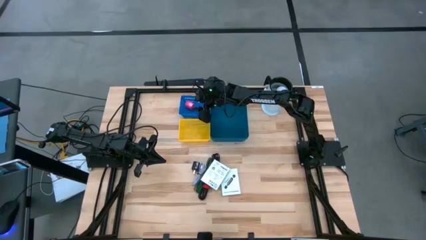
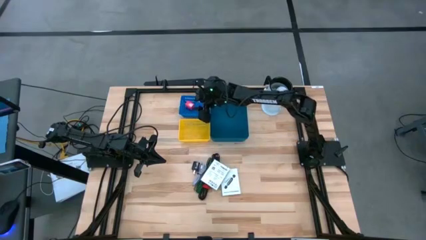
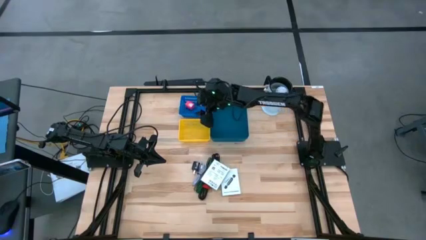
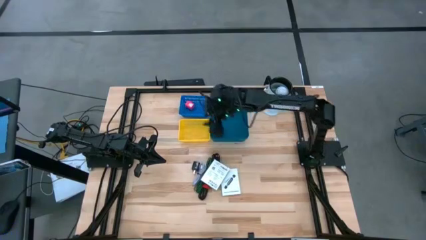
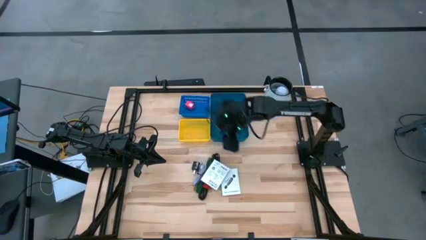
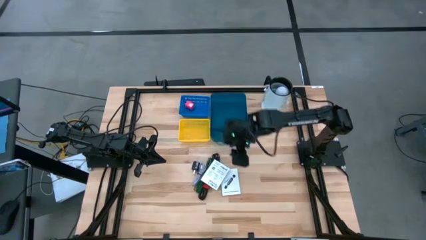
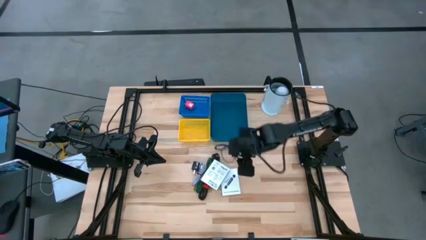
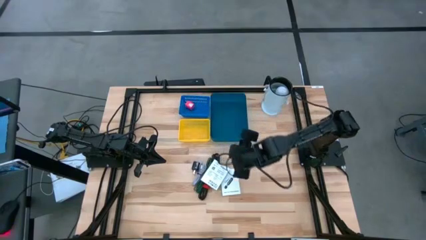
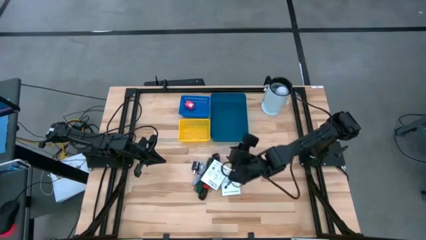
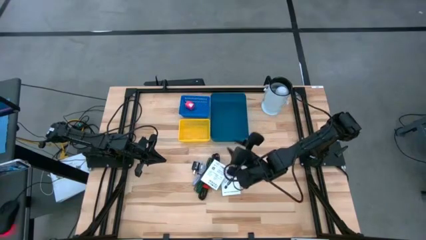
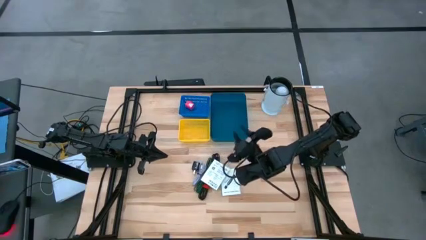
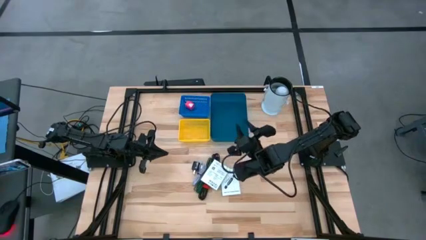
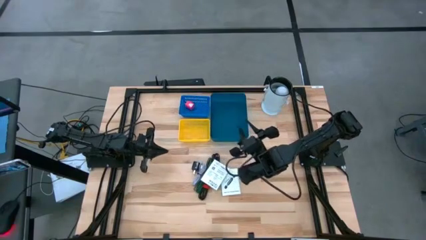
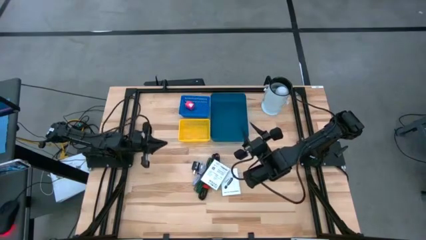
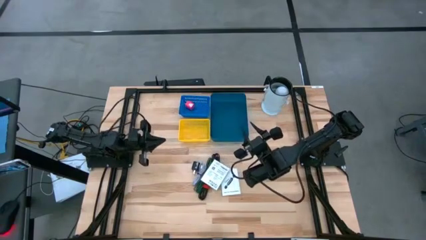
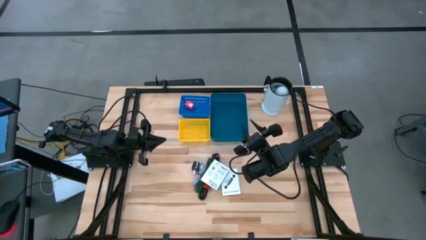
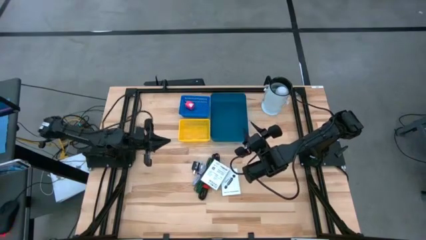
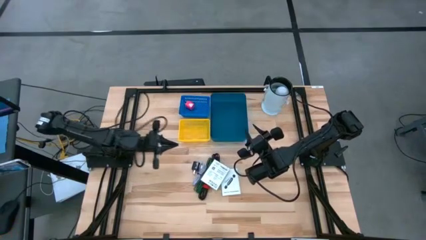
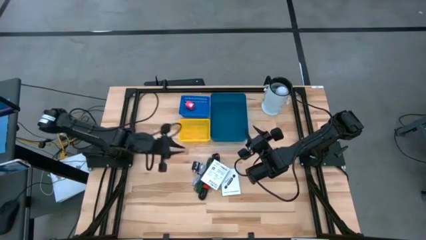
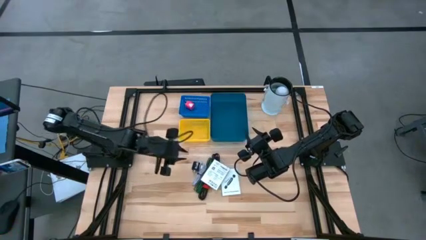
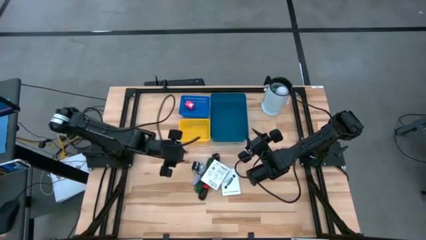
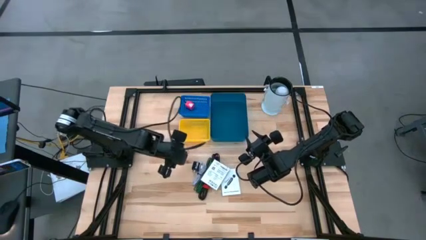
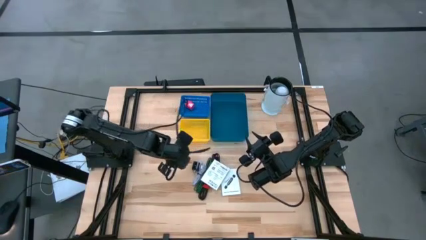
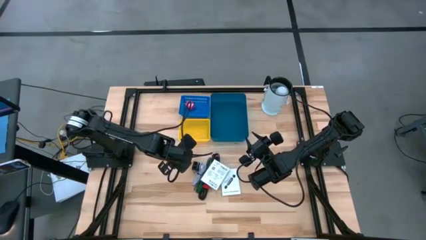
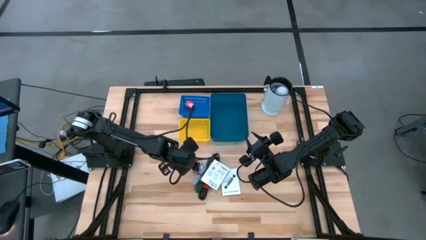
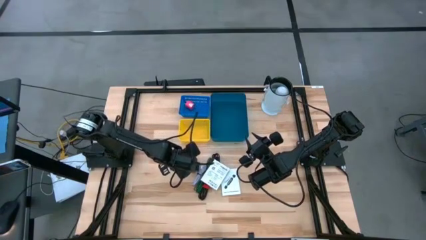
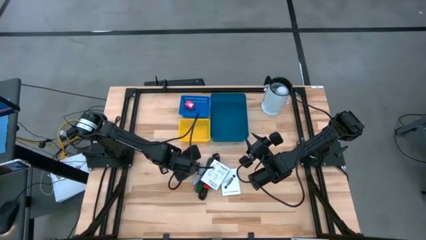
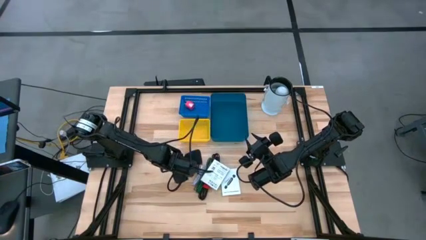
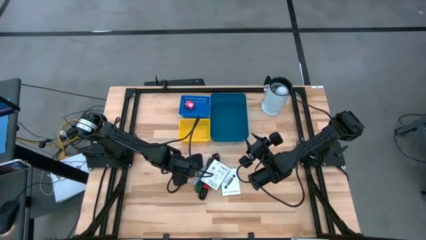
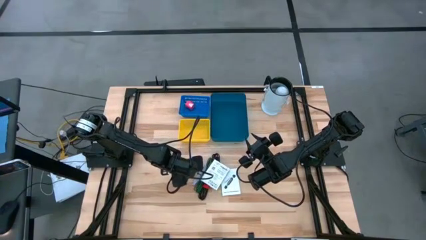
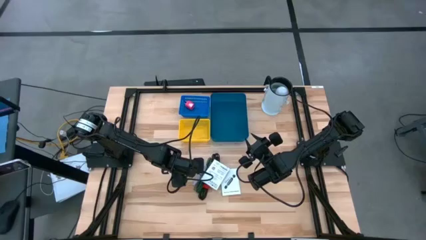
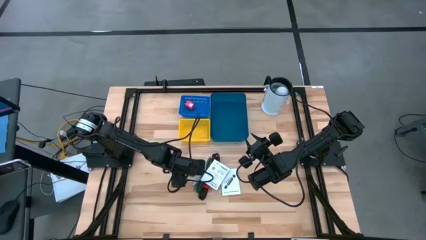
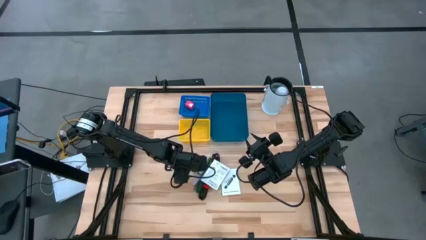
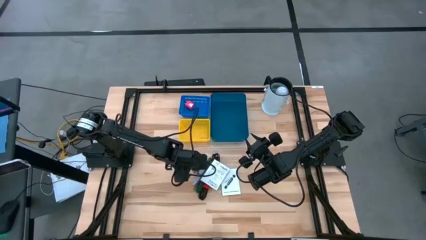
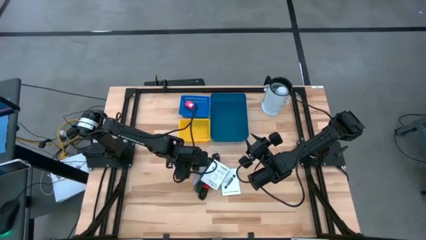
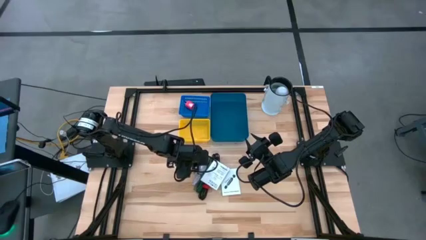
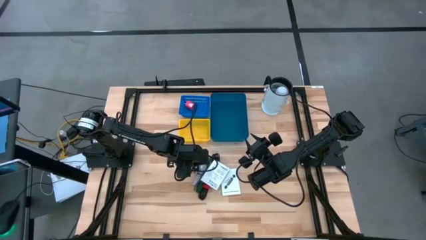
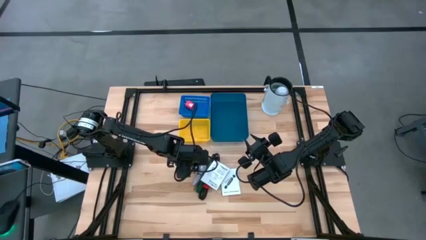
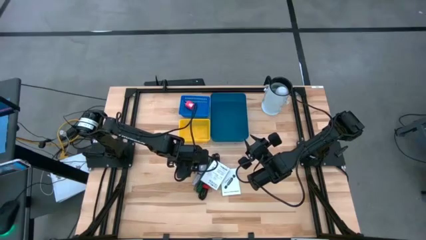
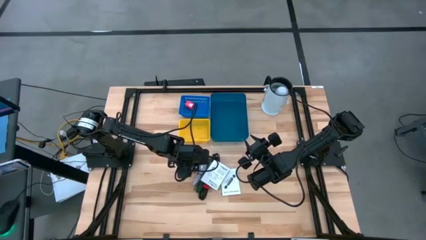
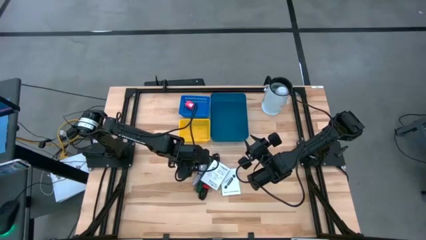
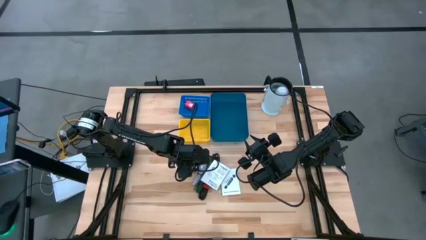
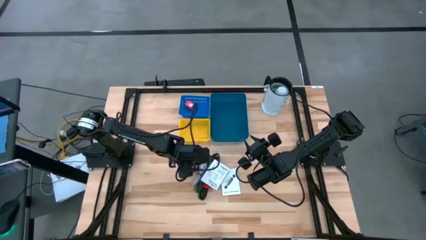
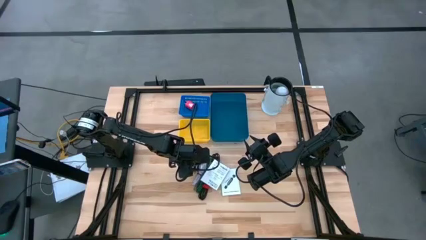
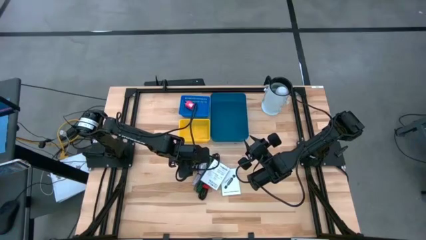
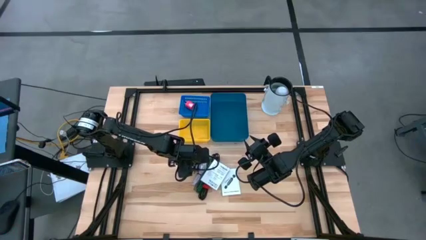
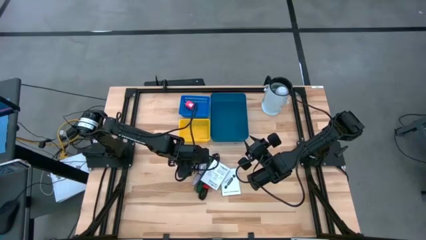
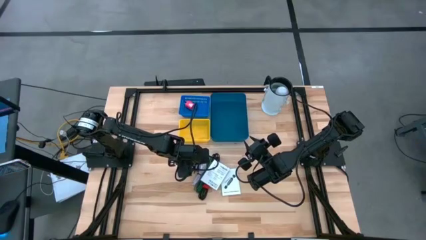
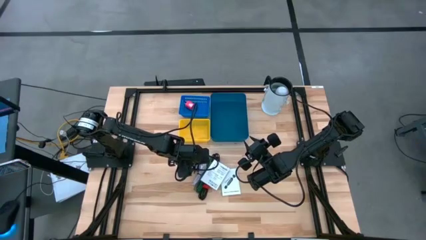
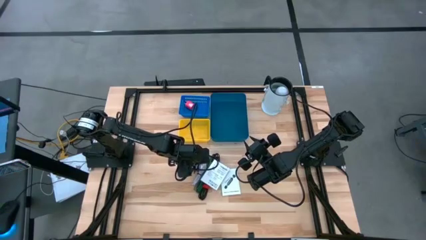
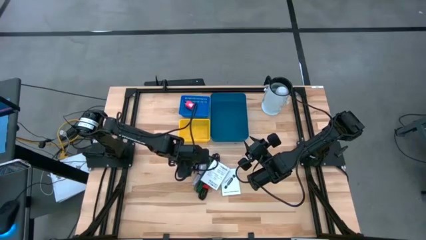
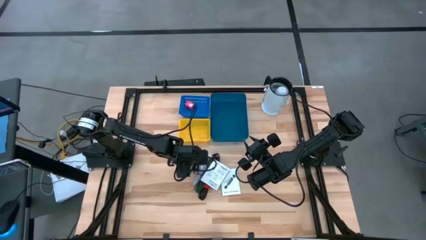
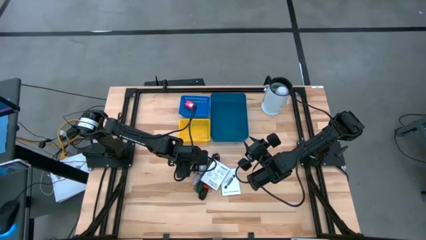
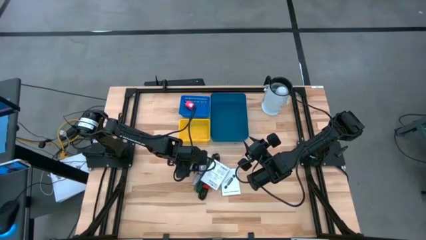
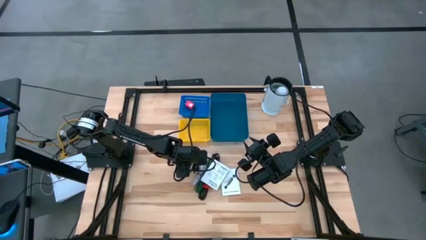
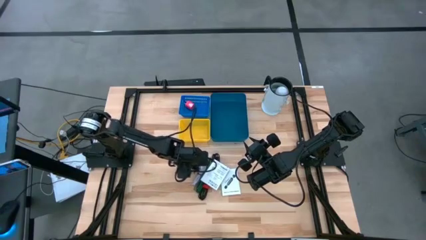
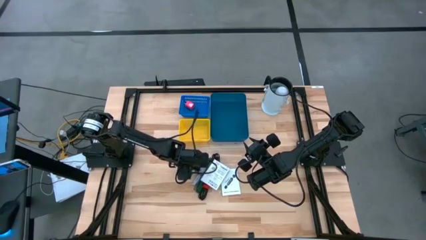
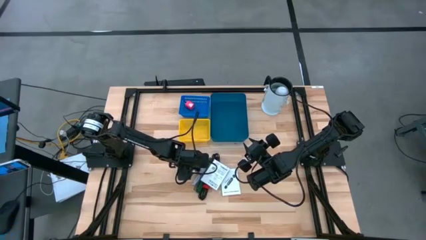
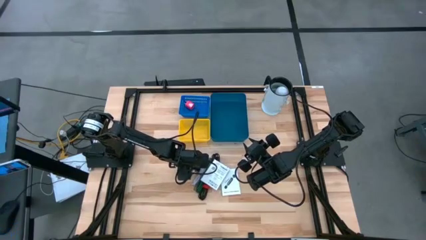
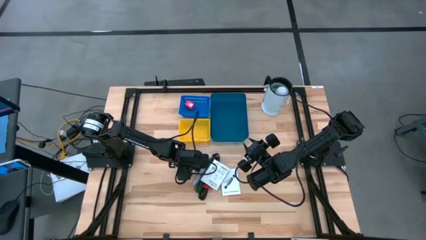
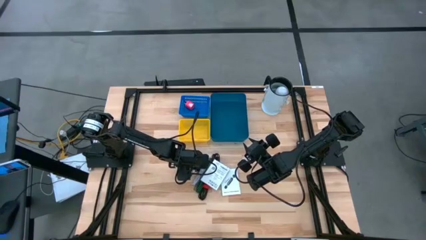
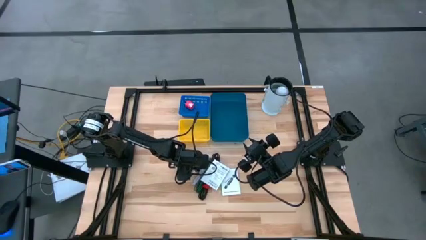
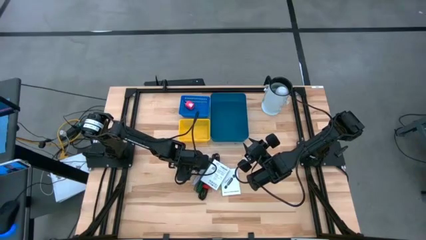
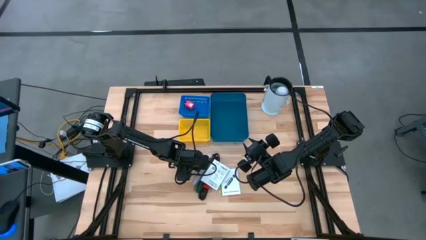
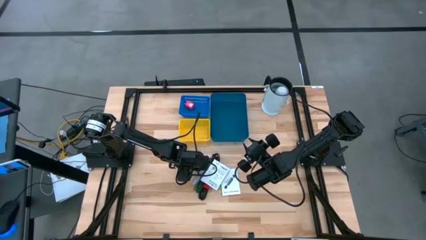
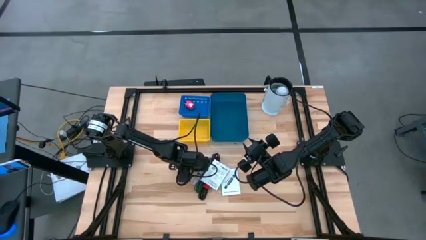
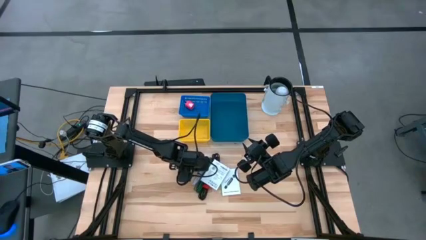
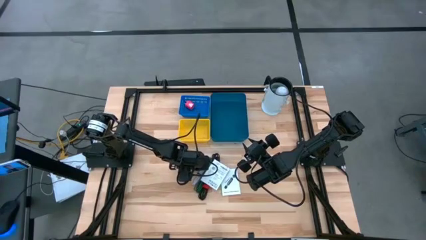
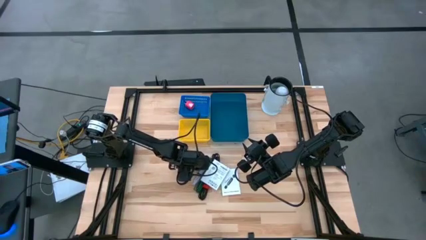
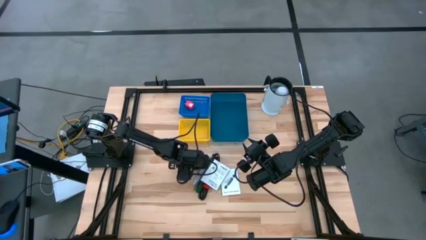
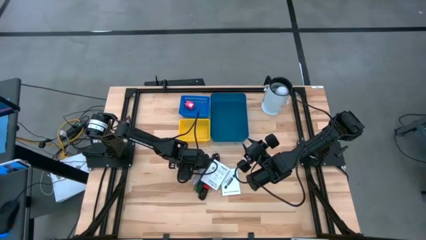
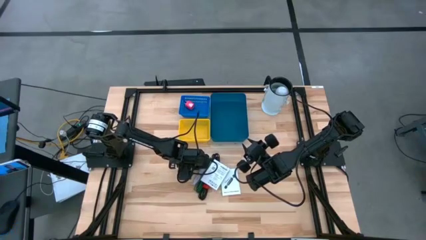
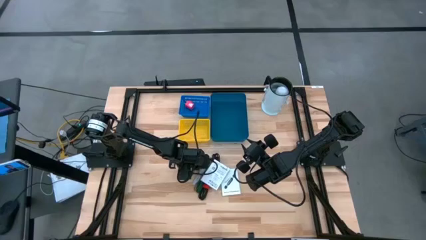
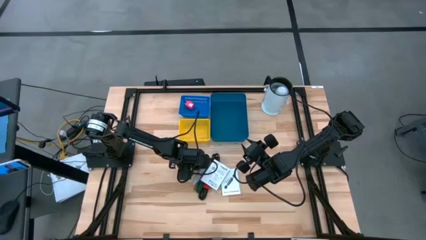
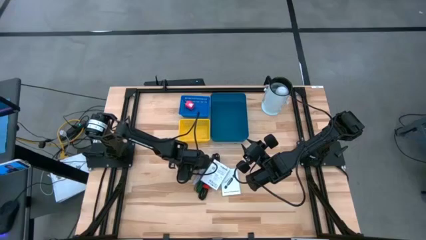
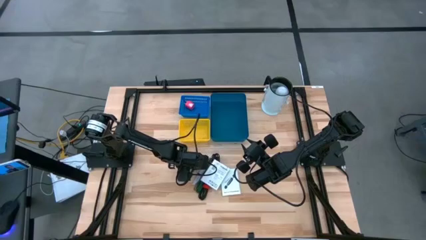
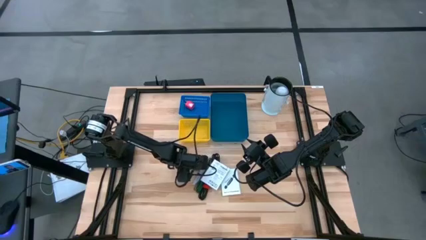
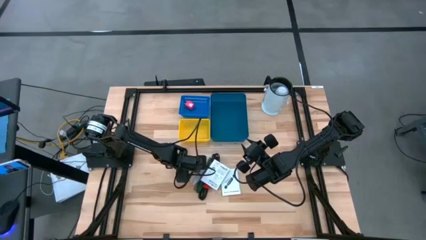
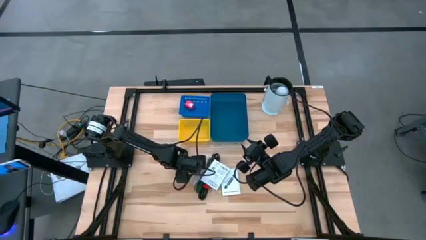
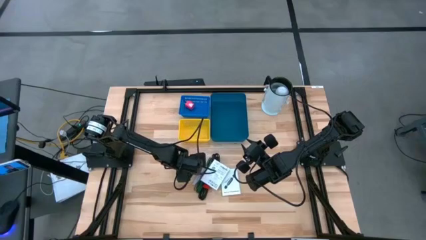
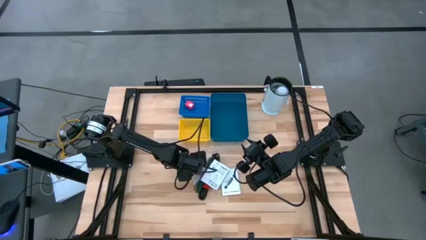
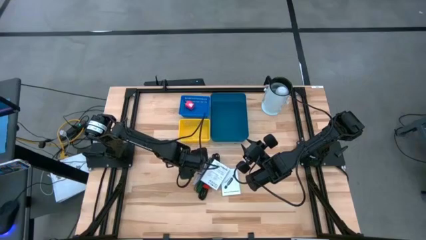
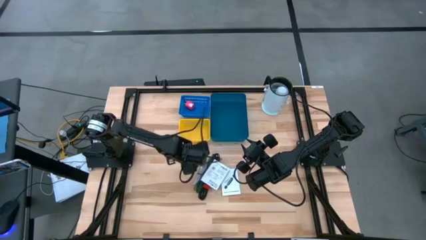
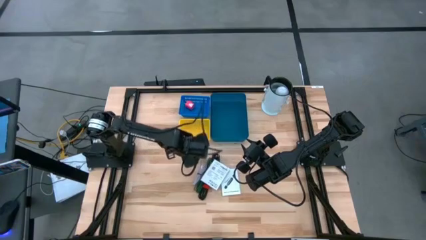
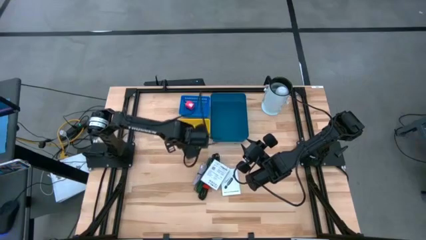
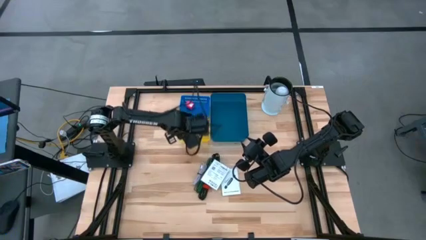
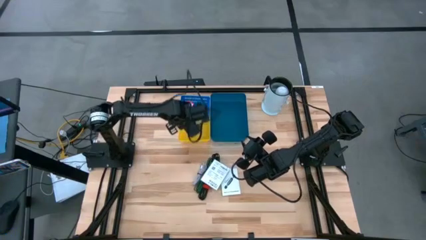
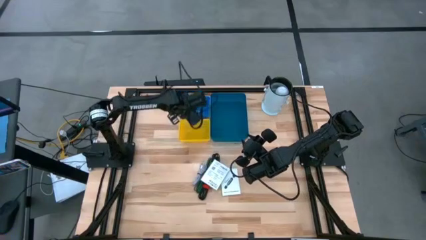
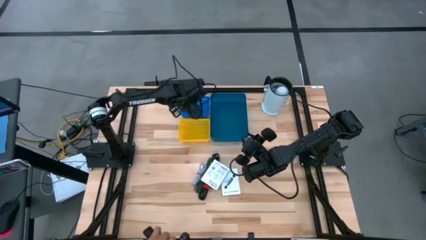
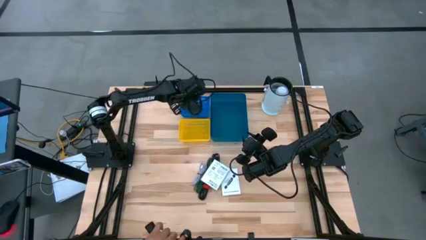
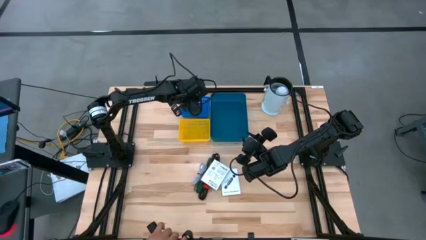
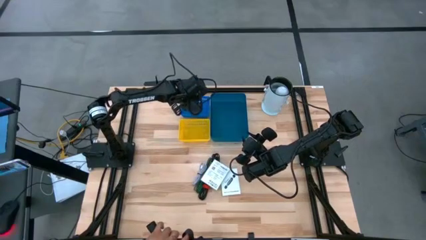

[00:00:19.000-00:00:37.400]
Task: Pick and place items into bin
Put the black charger adapter into the blue basket
